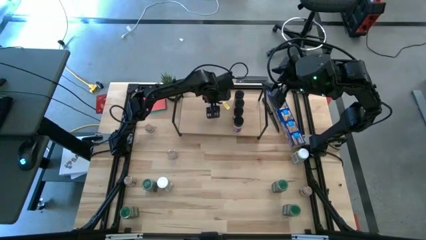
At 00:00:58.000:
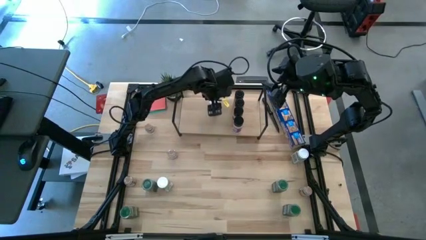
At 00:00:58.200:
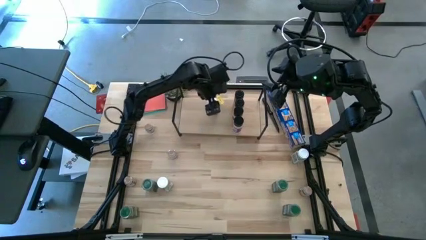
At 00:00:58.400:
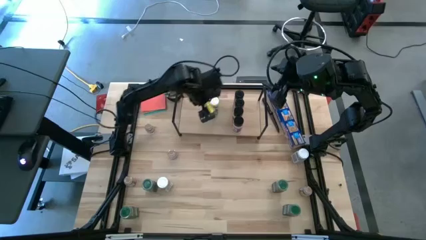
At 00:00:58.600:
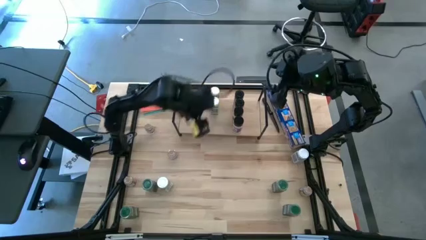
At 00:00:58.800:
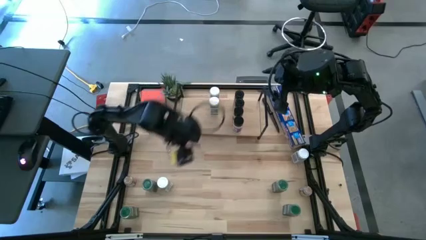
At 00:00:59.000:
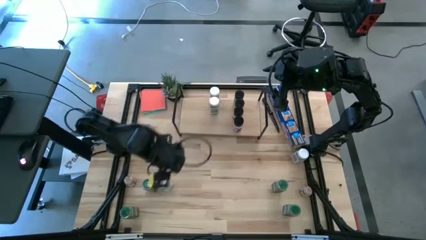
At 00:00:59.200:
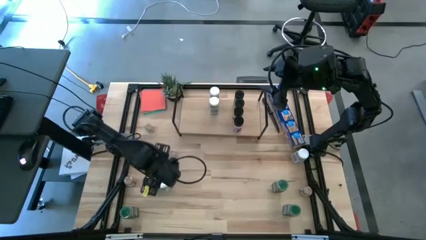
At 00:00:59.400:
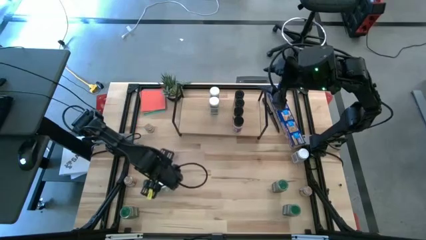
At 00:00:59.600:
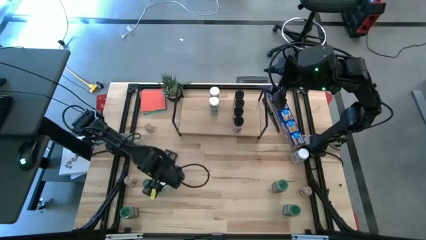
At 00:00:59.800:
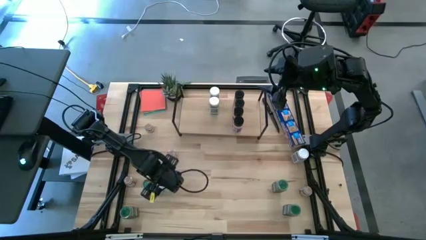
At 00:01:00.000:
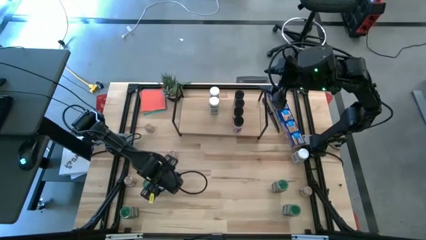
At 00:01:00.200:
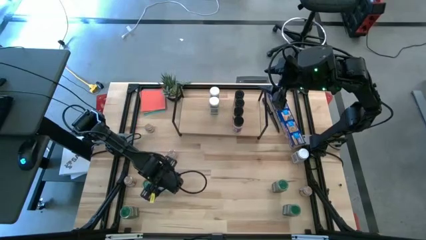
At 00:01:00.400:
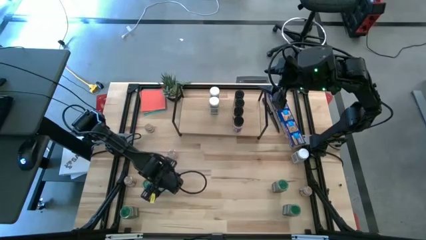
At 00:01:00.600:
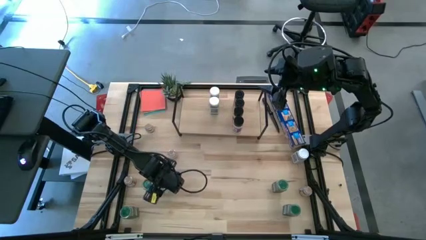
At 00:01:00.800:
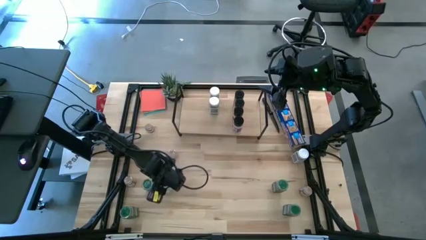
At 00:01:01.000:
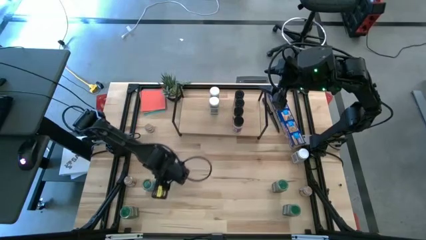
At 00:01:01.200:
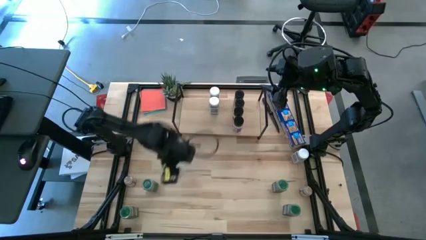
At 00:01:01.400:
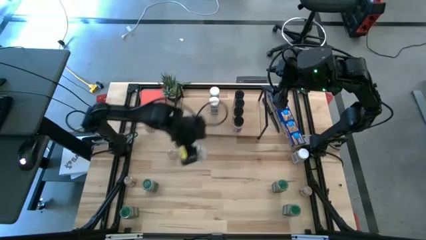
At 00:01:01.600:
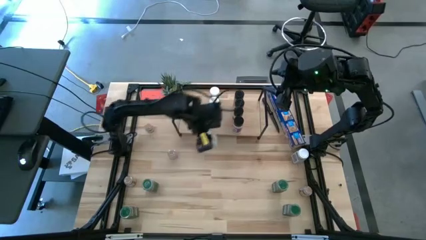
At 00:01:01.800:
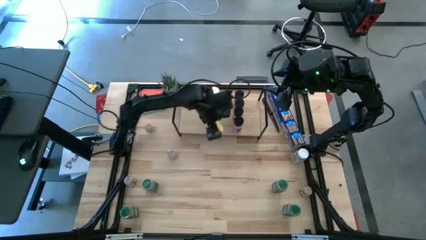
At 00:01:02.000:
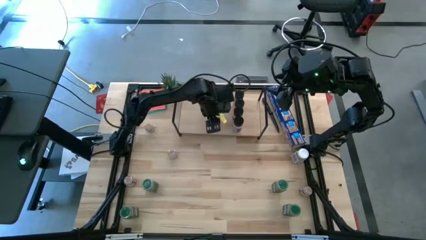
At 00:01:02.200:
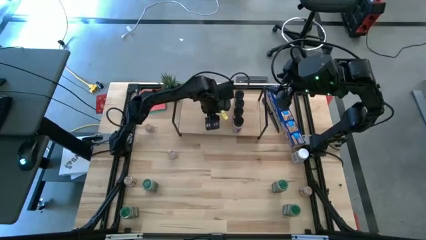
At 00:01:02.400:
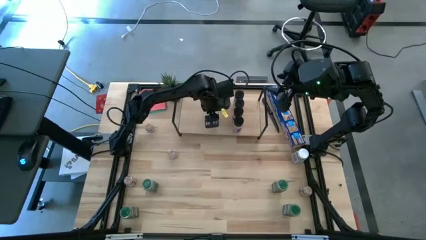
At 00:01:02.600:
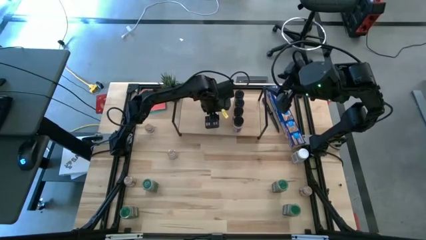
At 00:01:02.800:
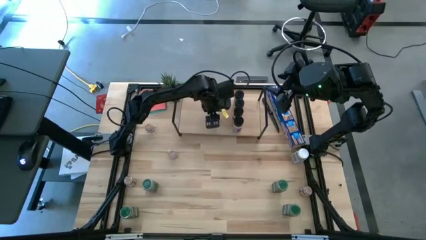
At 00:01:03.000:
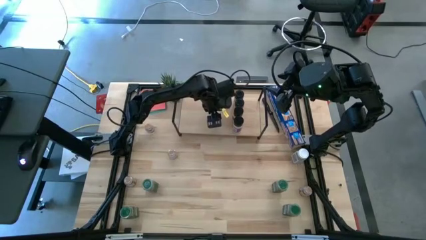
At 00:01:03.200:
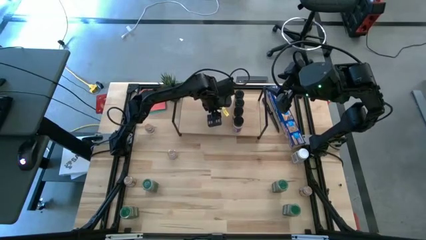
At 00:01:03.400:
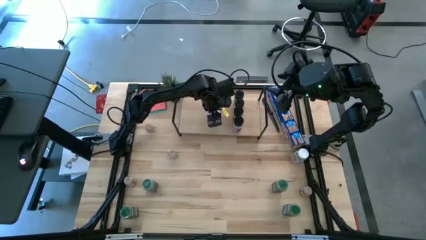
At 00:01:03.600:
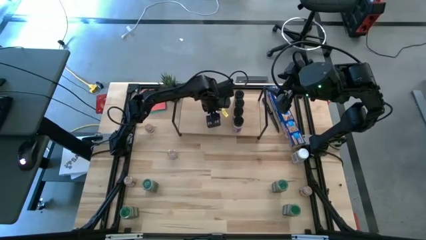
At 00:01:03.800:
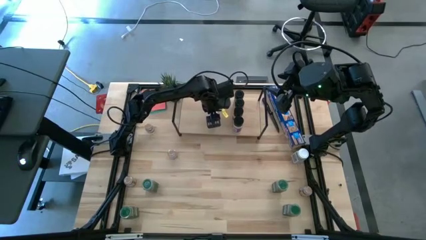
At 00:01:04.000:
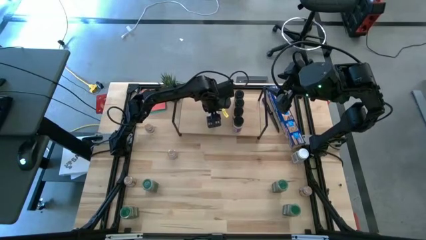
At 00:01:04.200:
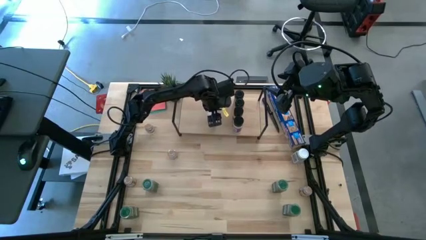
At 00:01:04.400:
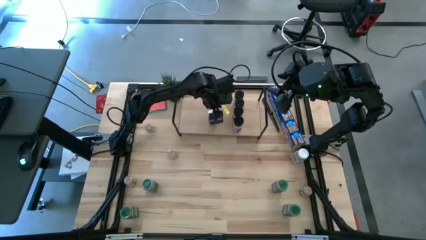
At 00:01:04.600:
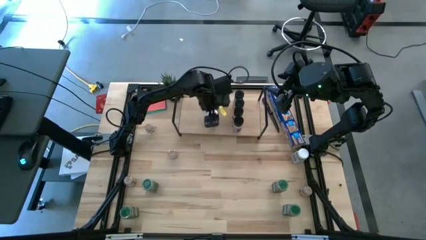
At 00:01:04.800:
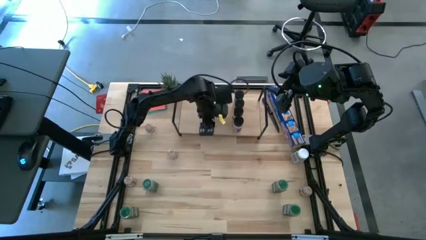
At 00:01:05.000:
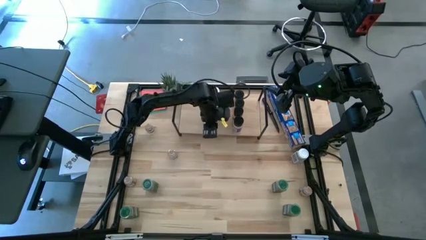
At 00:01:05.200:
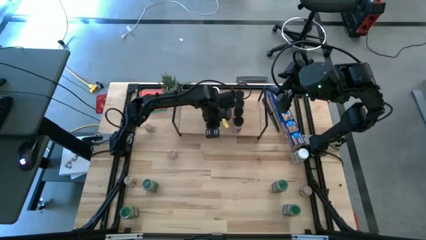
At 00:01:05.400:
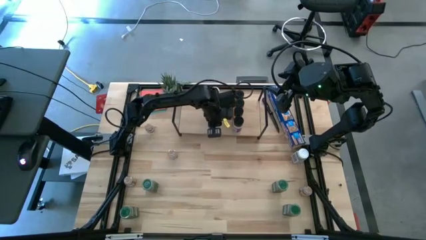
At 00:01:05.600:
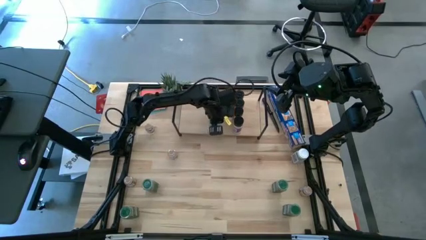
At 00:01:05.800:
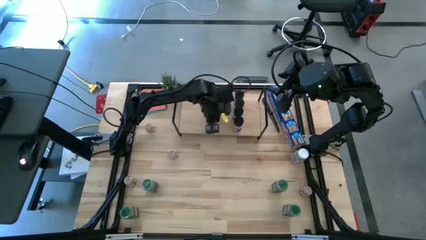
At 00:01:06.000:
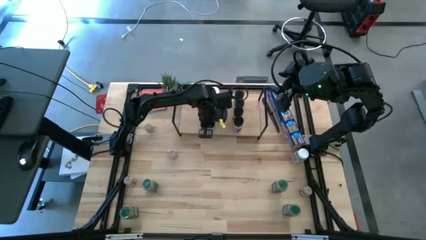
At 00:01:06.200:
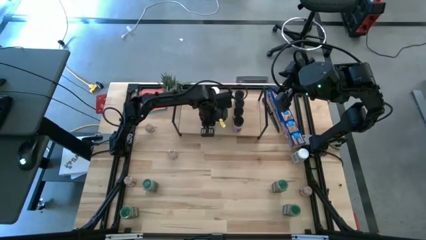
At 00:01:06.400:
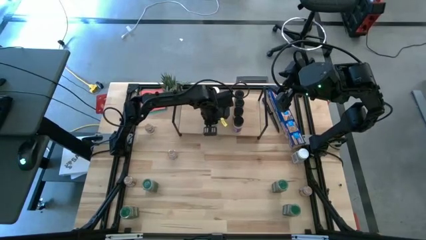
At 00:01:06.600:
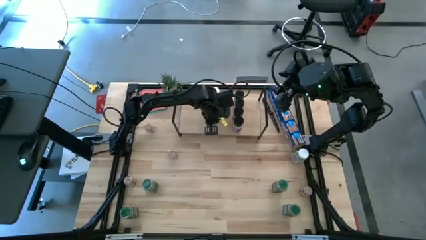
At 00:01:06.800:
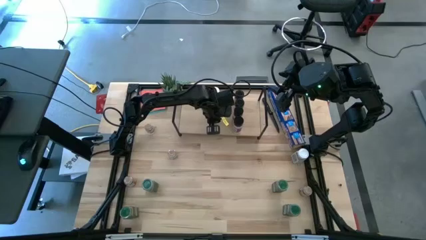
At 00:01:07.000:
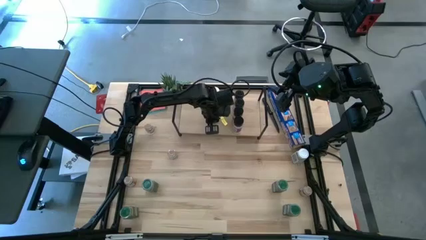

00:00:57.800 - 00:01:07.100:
Task: Shelf spices
Put the white seasoning bottle on the shelf aligned with the other white seasoning bottles

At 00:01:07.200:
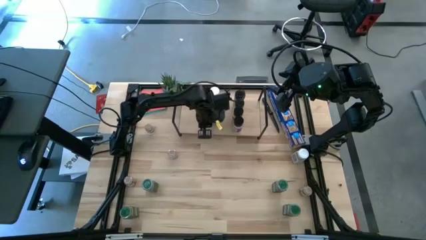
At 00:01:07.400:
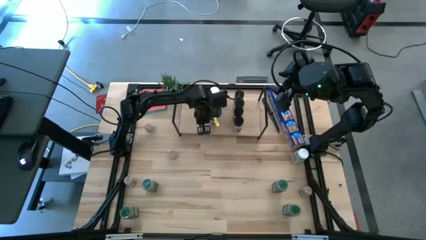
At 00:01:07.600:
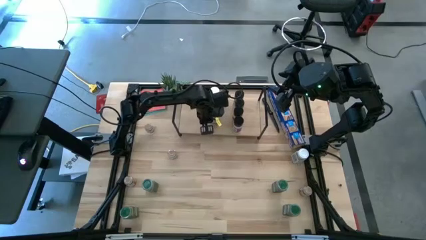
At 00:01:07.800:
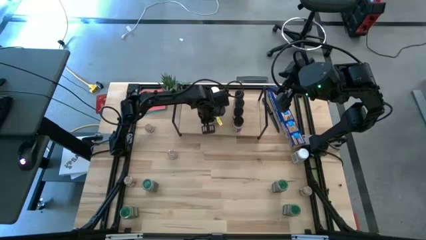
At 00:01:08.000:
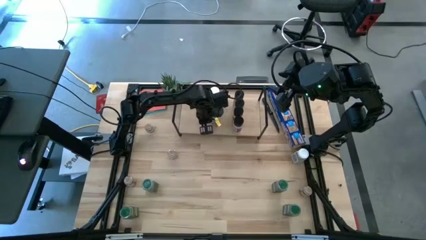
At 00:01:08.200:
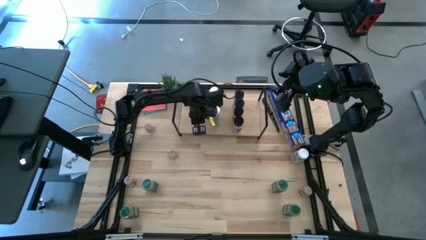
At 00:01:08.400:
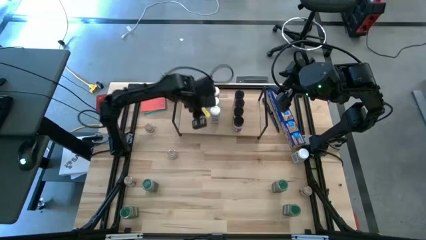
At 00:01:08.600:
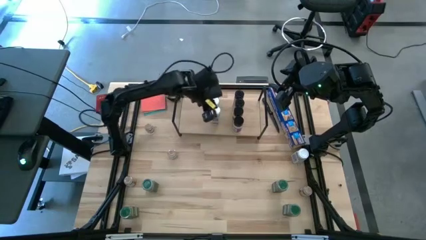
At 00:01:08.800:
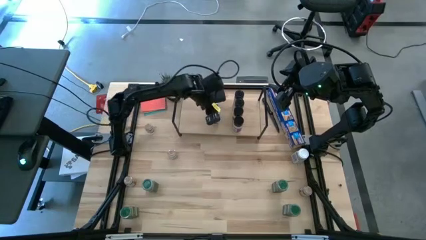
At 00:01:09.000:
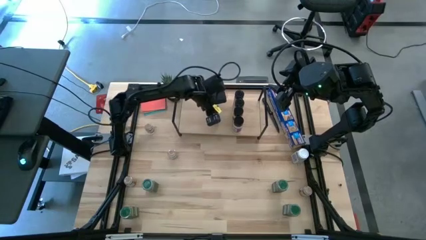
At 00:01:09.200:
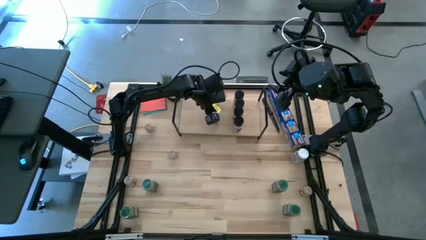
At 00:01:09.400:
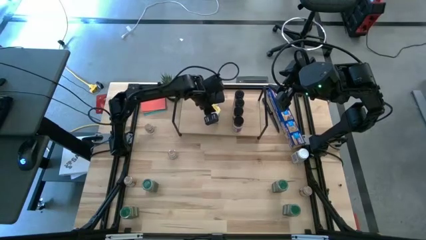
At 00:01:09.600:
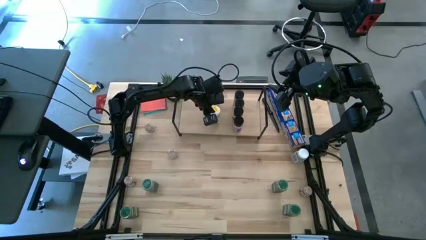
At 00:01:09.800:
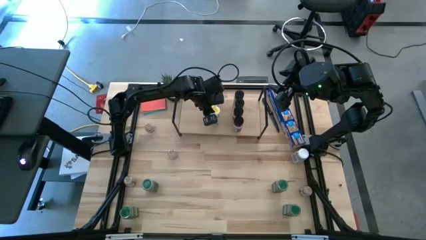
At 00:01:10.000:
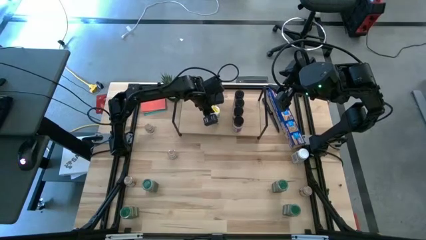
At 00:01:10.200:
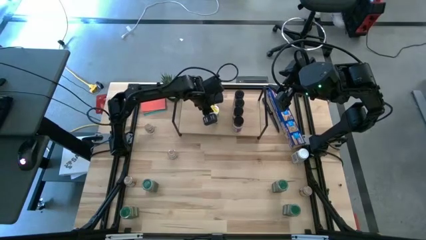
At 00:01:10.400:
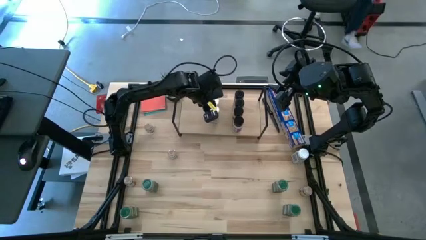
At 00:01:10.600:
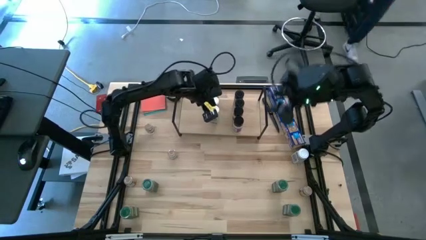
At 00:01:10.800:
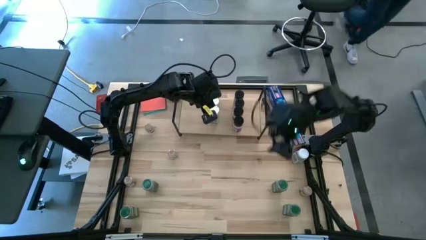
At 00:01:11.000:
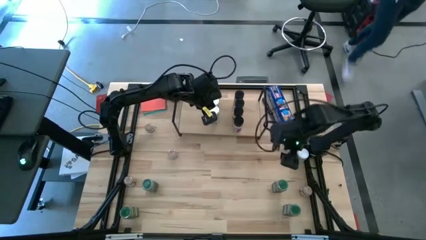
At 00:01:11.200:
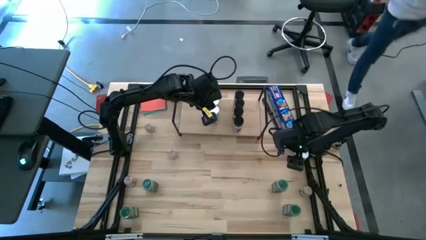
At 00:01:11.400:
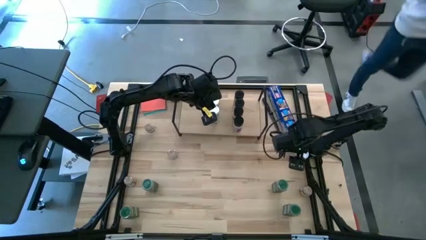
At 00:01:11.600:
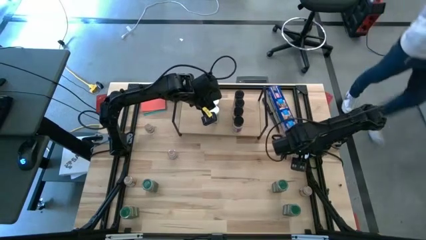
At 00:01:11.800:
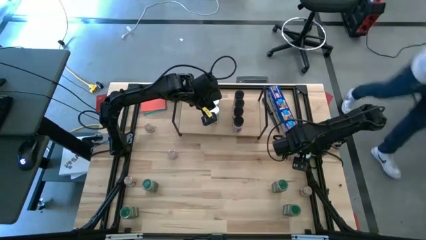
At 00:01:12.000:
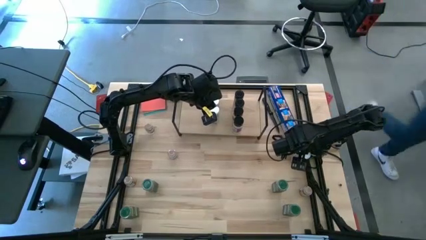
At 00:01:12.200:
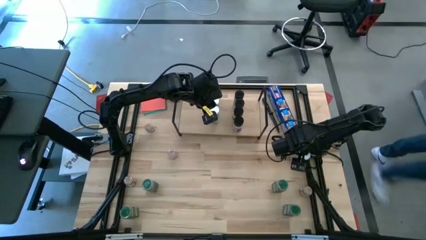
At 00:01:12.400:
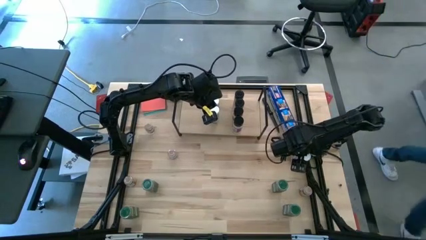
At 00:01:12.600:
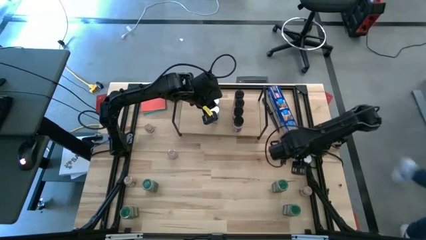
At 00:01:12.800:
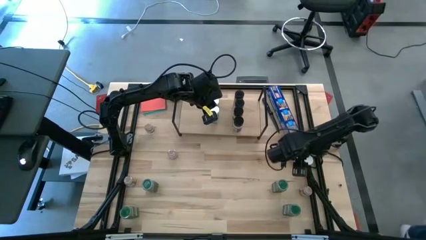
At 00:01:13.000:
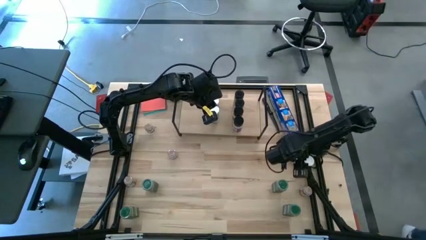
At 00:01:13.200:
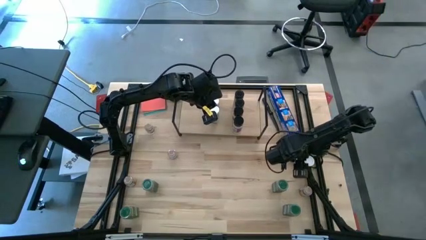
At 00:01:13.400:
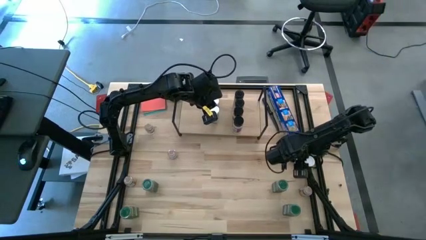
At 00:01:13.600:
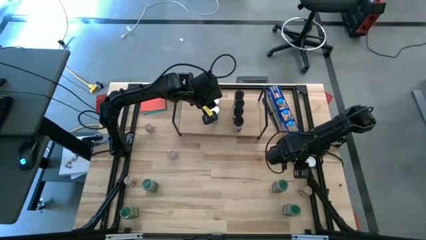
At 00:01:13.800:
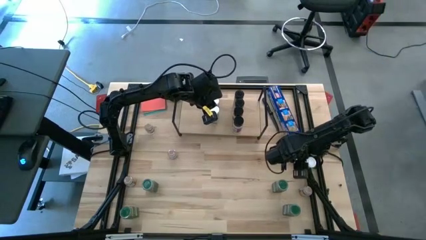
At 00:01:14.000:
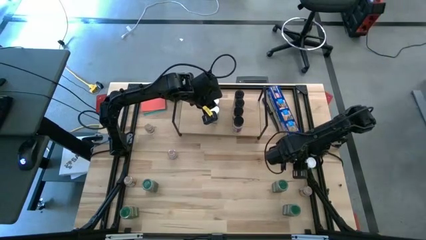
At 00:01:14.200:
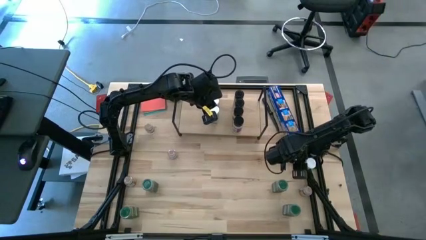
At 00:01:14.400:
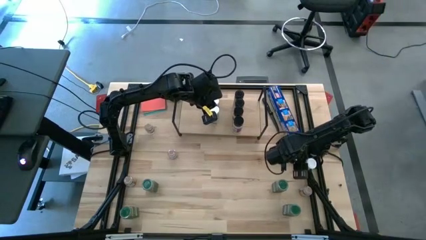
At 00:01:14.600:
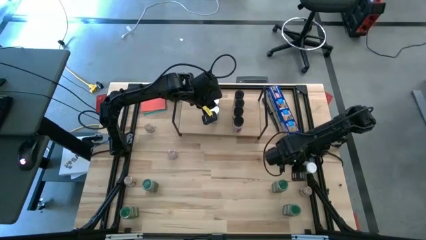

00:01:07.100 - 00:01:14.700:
Put the white seasoning bottle on the shelf aligned with the other white seasoning bottles
